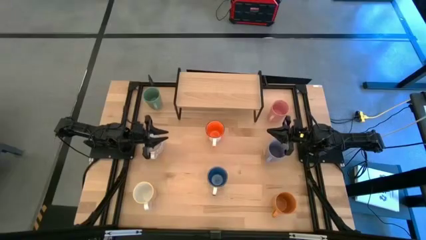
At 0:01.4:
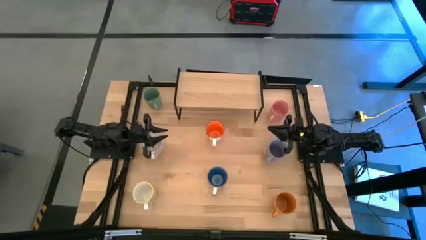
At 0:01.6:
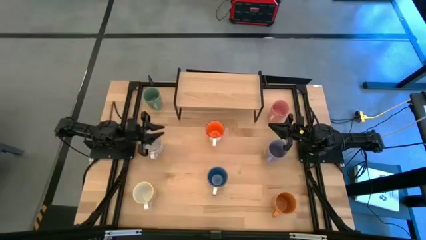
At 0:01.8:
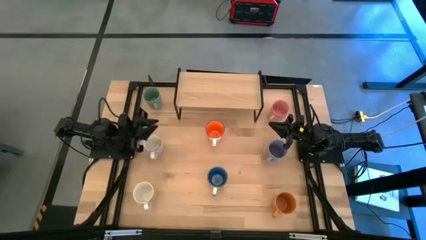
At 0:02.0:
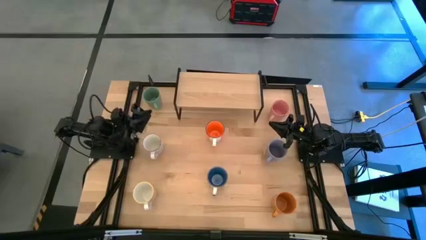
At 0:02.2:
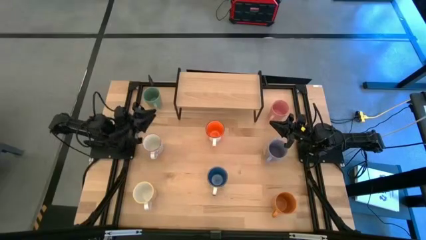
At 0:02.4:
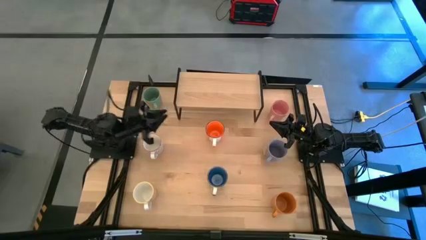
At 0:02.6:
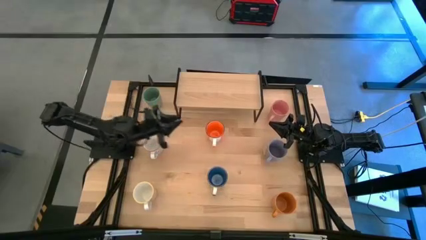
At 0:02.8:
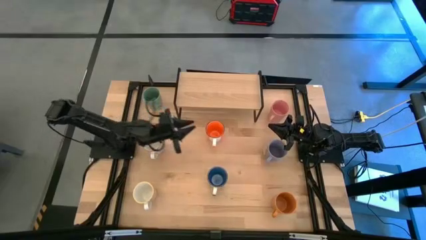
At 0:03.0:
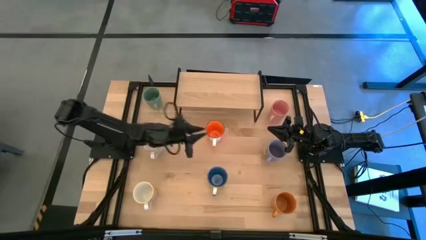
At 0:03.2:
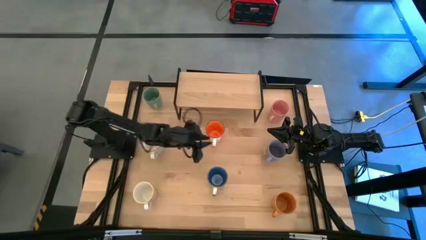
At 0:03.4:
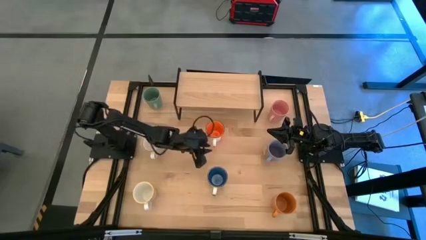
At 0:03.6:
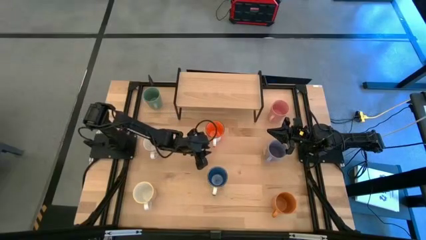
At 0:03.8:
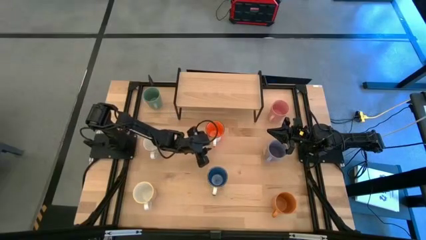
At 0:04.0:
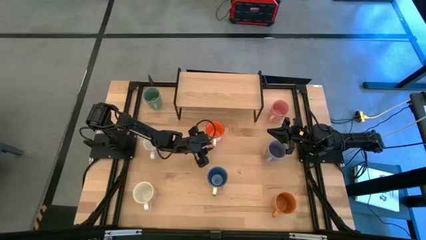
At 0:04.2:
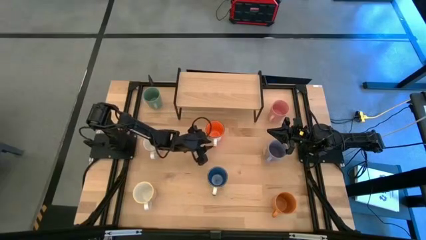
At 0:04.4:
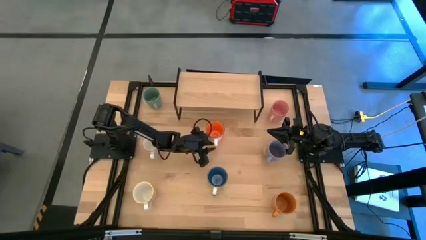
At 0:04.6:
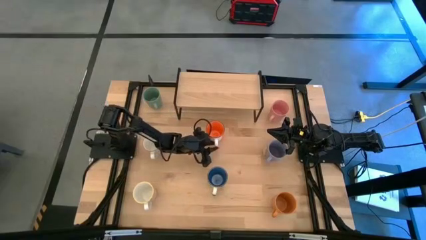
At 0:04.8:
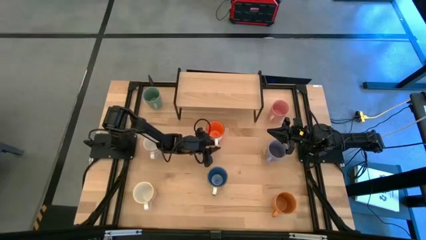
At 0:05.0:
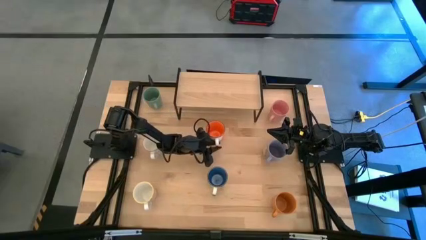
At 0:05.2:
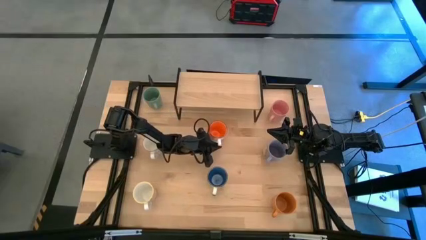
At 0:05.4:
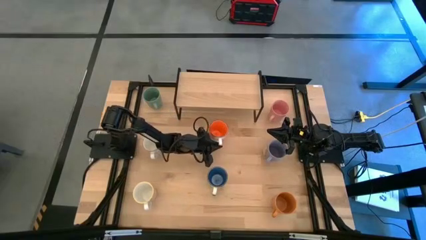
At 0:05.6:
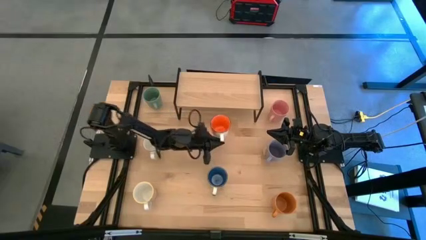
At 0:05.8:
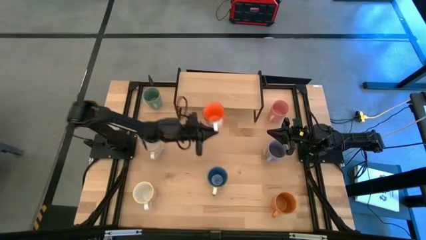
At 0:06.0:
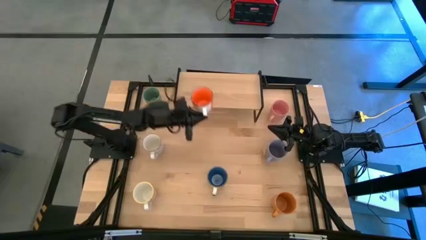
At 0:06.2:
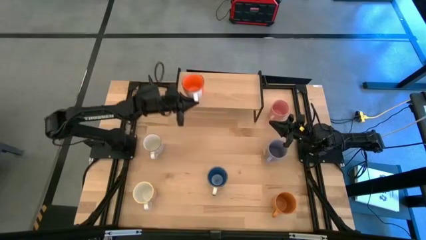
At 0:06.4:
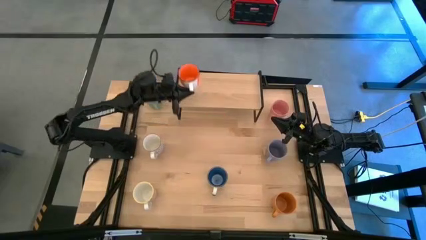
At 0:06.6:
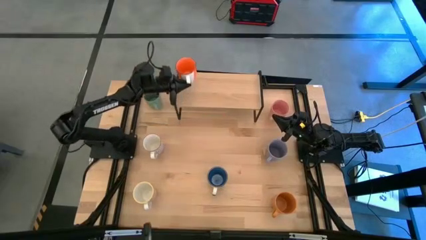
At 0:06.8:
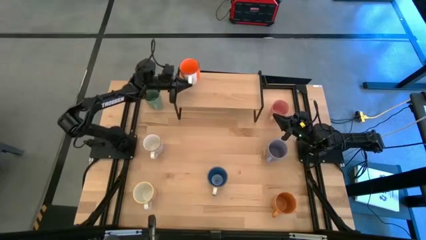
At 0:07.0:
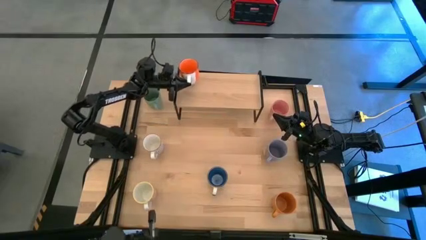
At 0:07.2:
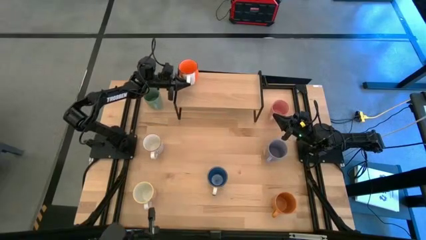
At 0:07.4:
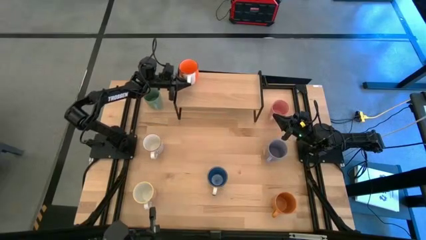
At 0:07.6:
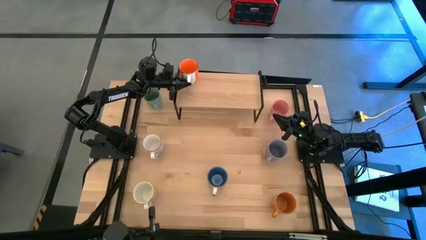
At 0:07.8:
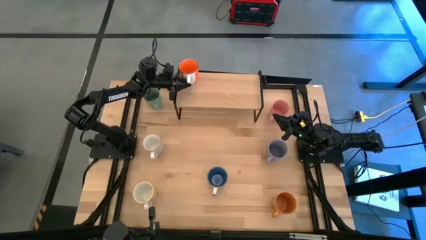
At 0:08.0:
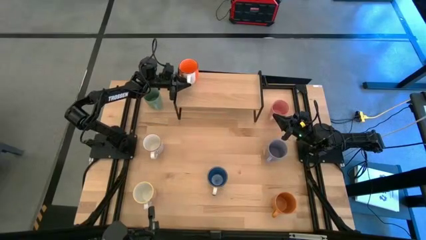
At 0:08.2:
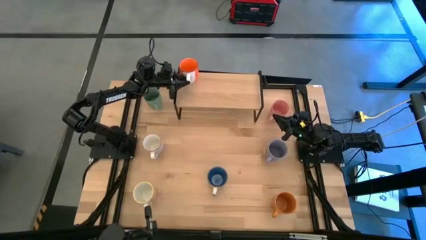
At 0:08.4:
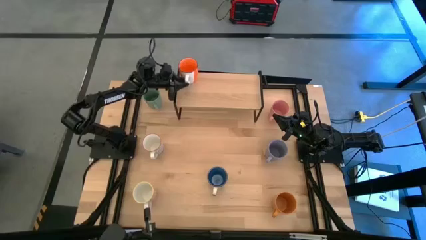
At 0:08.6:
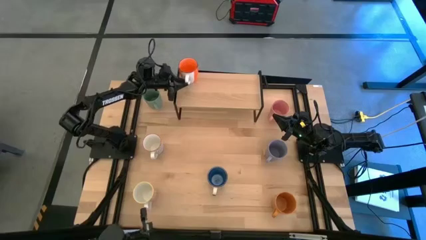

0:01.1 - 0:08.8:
Task: Place coffee mugs
Put the orange mug on the shelf

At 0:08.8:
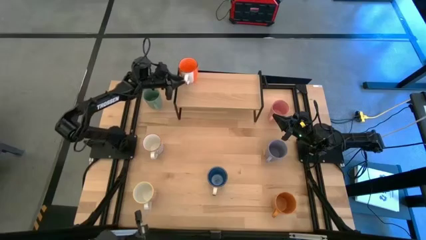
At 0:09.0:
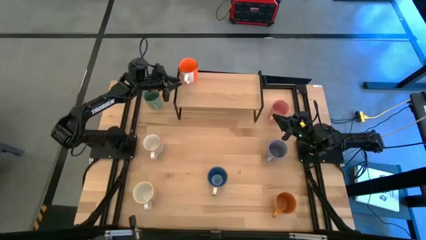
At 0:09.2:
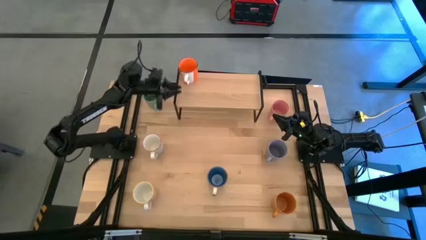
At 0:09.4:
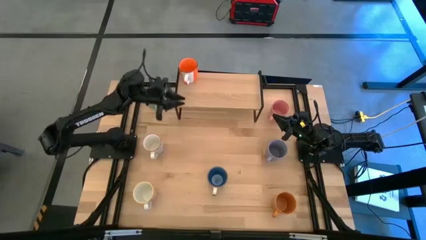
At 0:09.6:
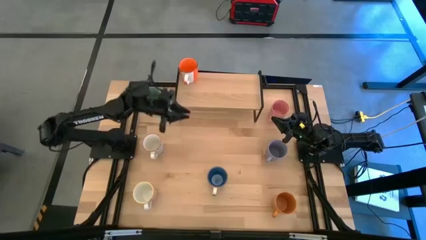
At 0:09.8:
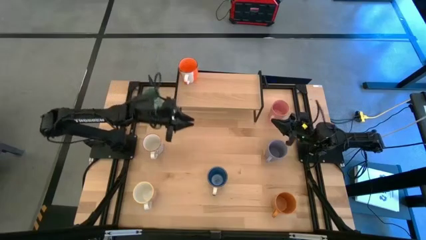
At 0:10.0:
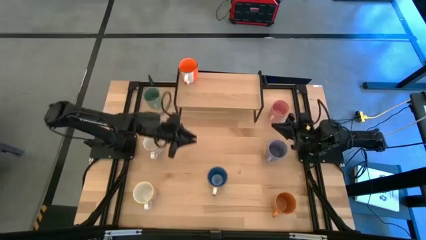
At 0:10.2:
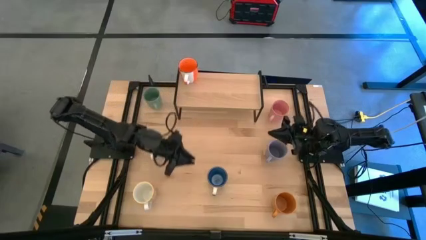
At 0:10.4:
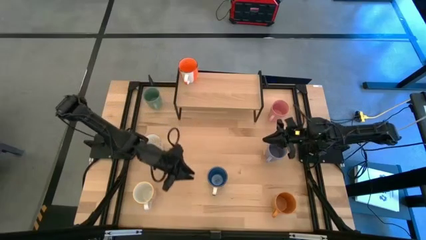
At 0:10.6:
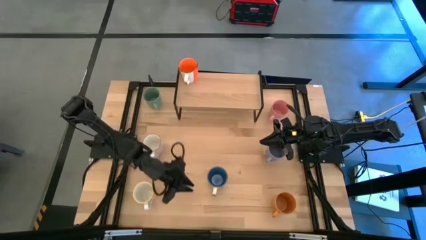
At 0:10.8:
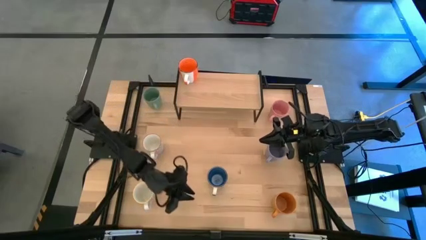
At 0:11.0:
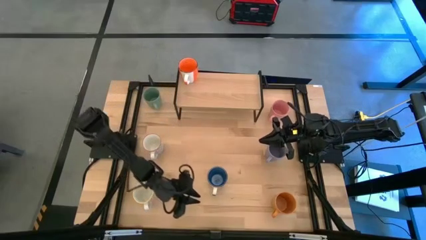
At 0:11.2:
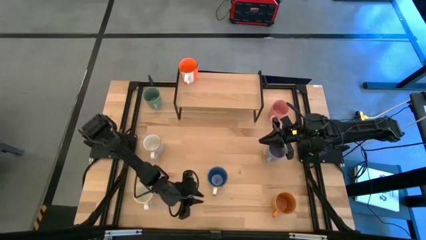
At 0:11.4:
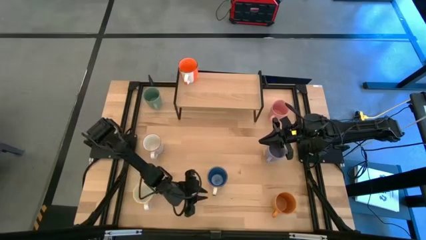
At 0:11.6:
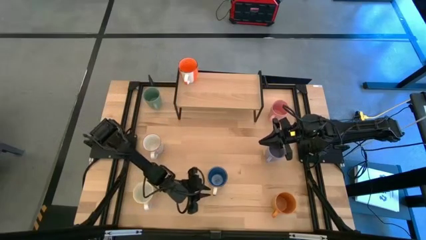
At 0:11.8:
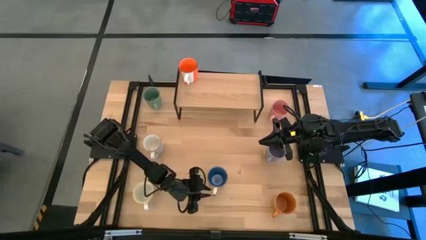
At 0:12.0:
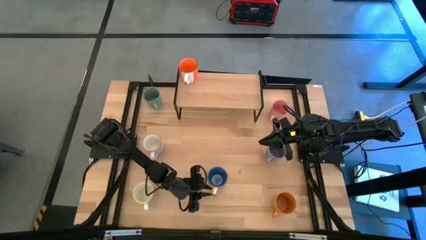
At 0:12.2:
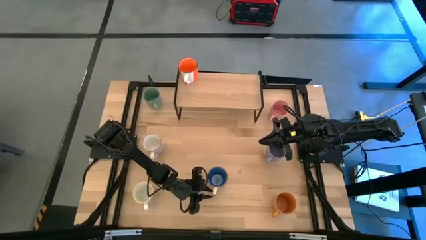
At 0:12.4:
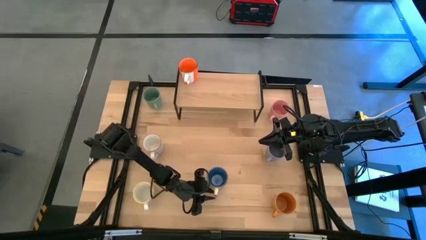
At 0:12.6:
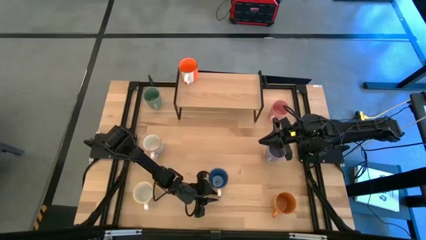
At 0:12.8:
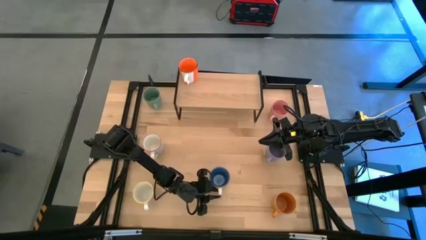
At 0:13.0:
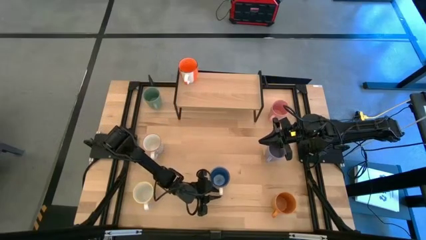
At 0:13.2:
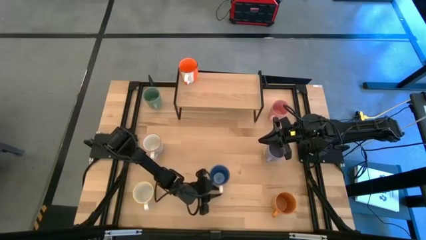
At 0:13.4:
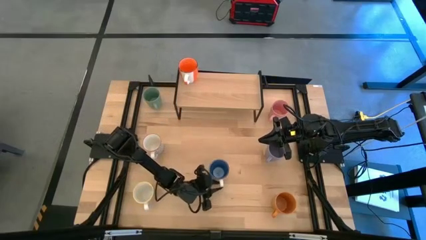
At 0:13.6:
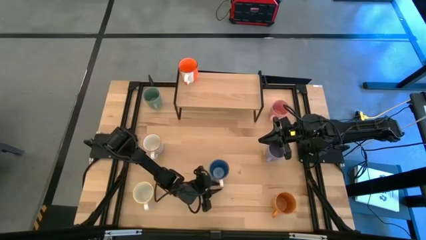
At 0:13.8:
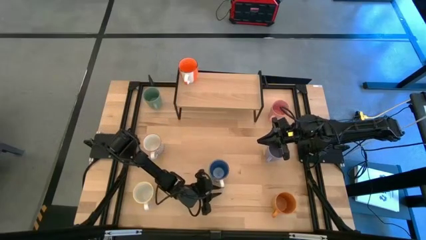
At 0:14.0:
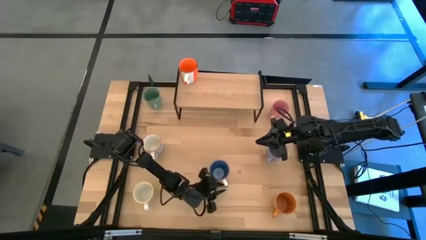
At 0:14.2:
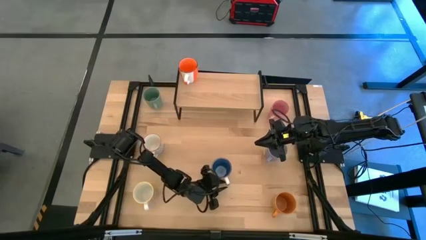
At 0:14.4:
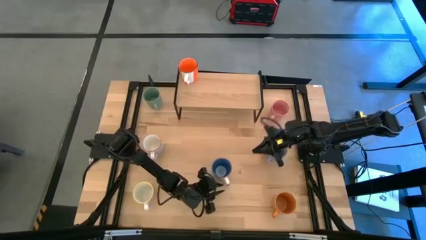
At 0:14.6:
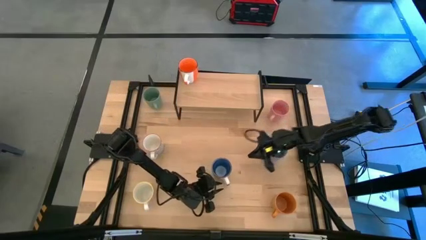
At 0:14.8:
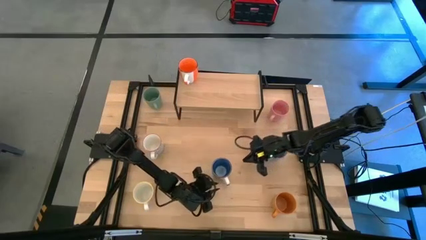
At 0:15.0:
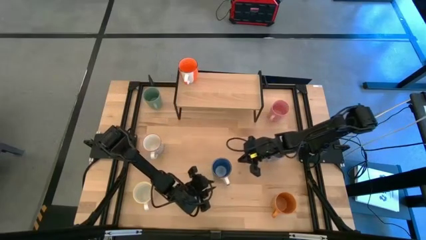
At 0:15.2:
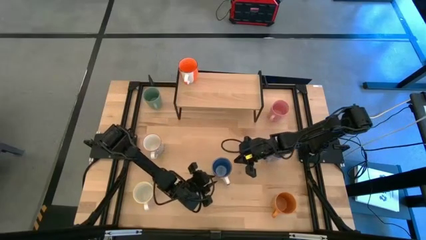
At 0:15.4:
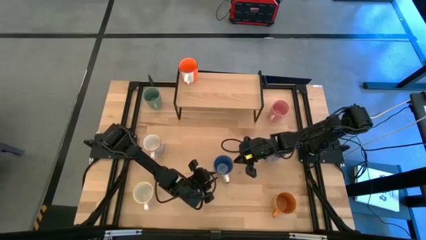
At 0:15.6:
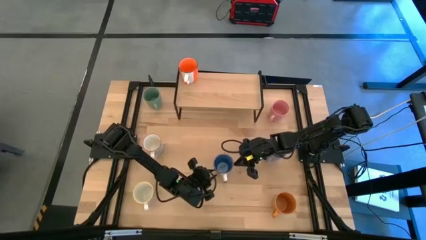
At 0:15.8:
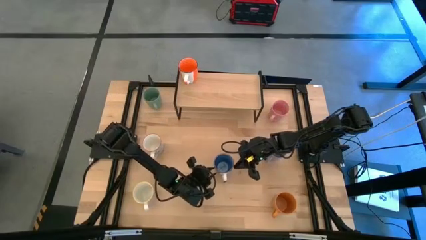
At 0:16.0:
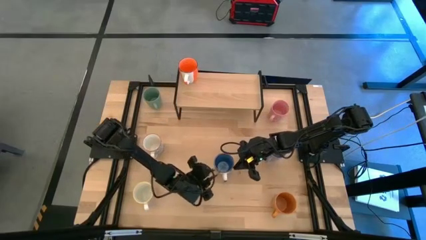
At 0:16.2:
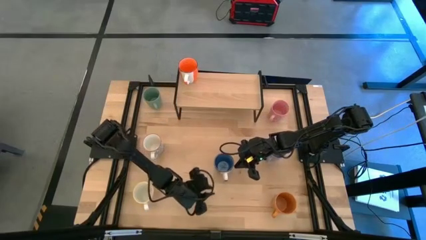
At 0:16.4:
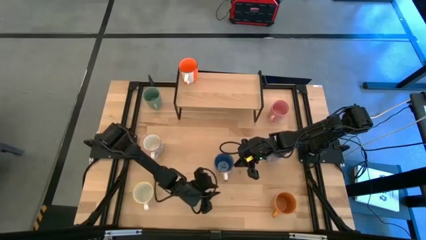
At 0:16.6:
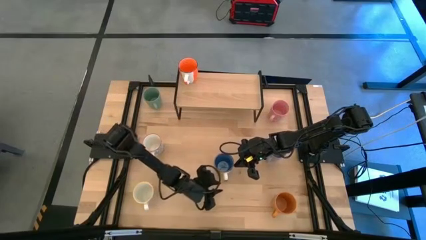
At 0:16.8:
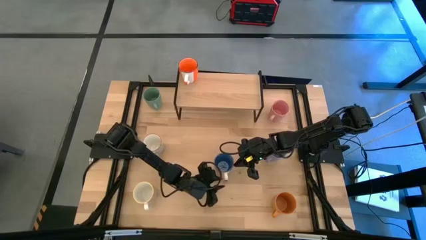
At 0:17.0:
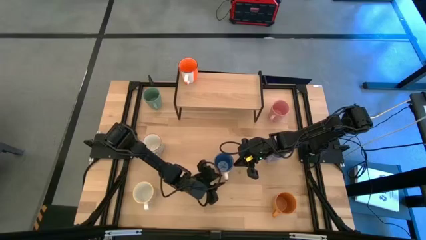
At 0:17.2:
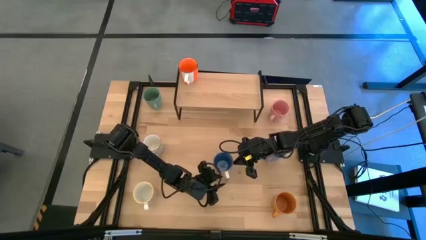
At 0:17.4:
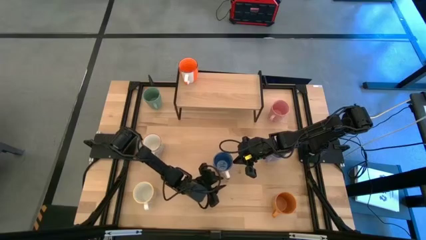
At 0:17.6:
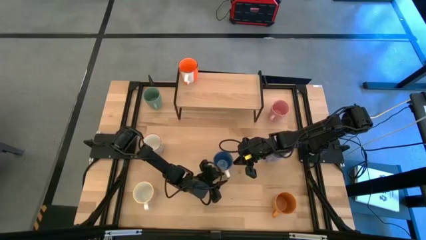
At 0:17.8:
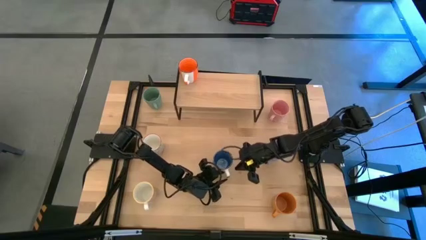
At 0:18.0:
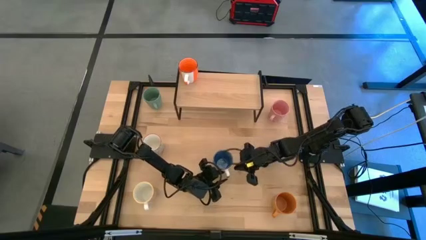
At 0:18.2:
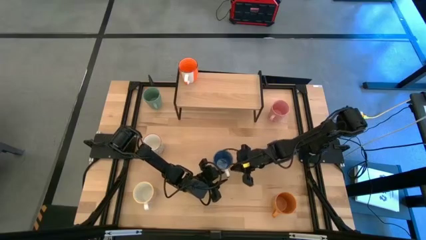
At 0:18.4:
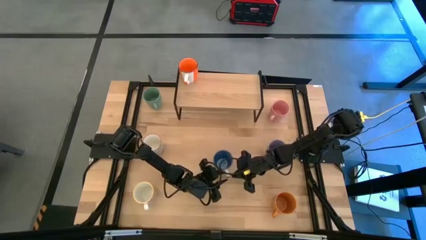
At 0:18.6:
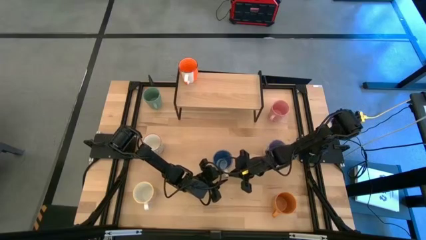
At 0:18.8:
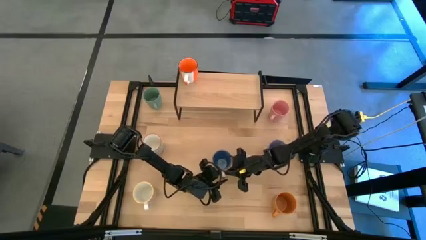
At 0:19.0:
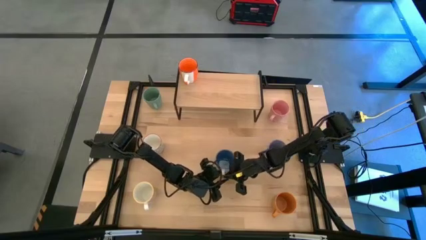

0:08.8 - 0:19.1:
Put the blue mug on the shelf
